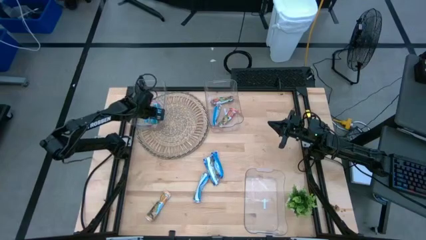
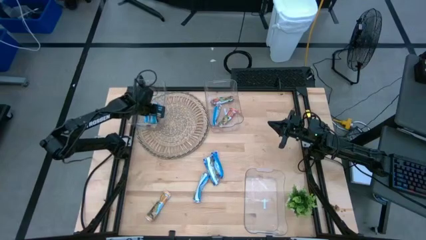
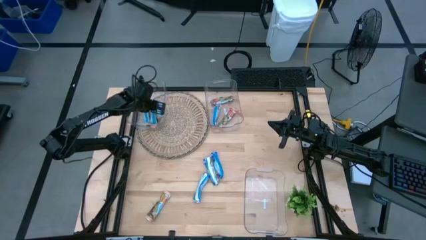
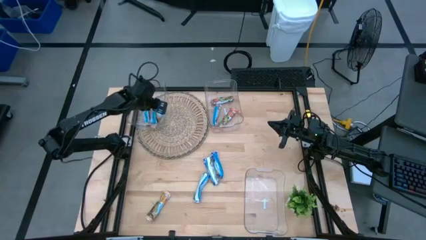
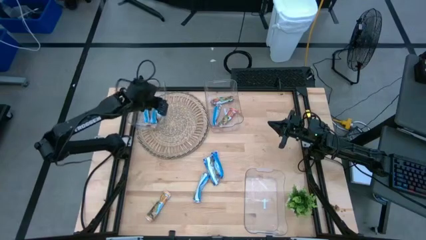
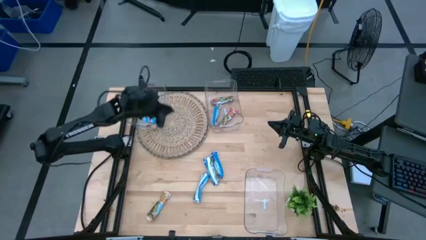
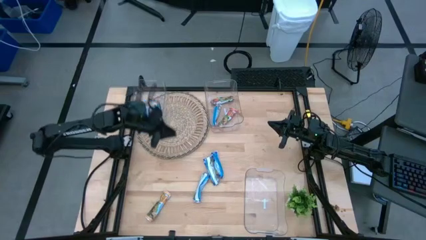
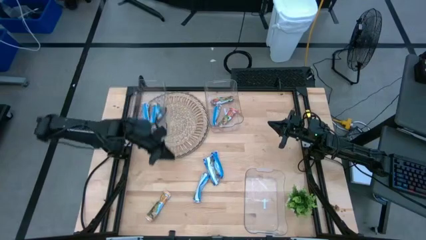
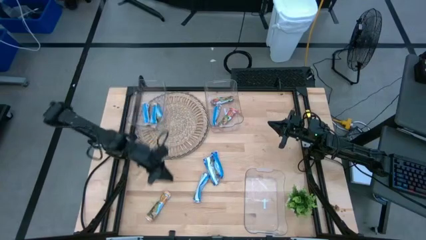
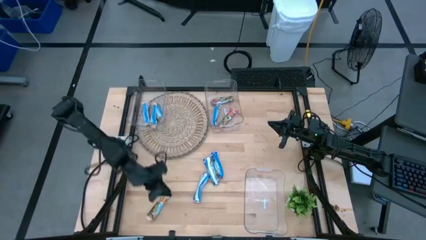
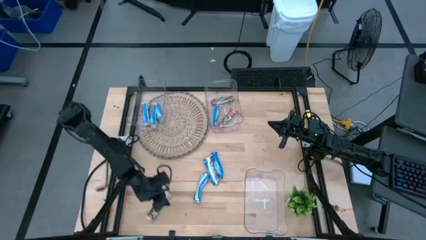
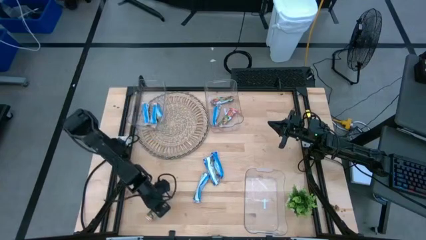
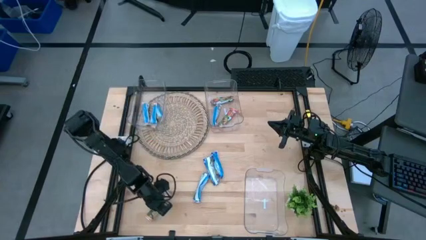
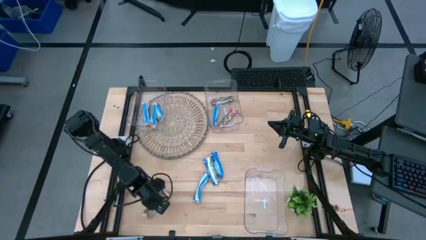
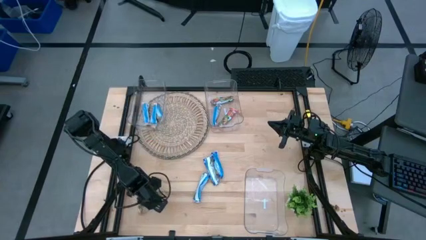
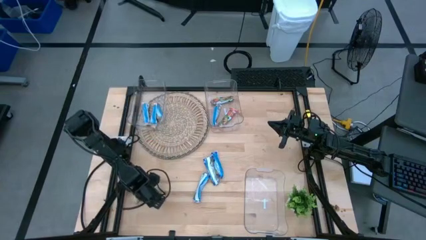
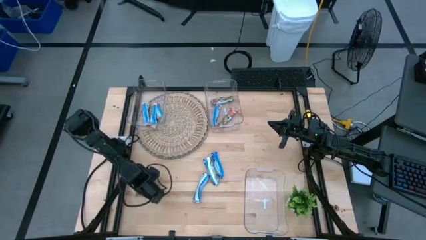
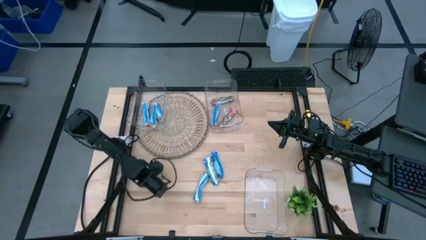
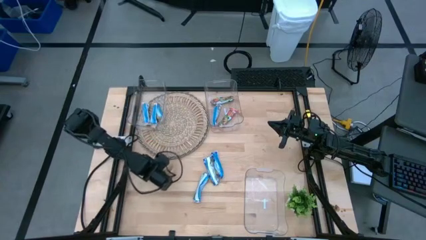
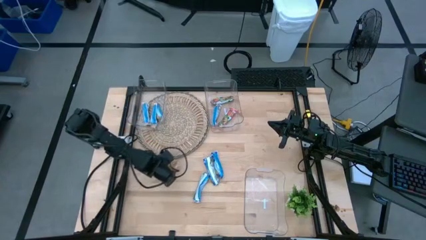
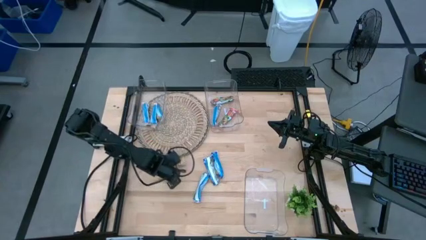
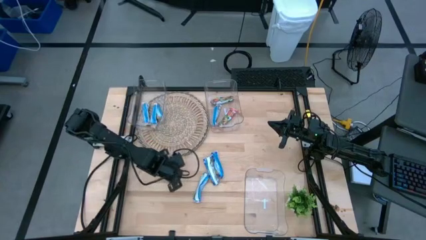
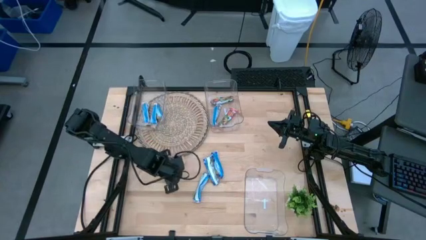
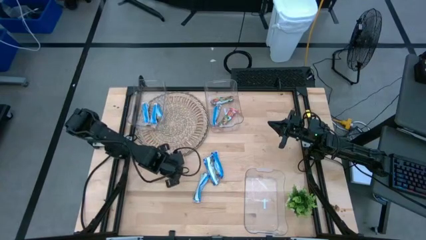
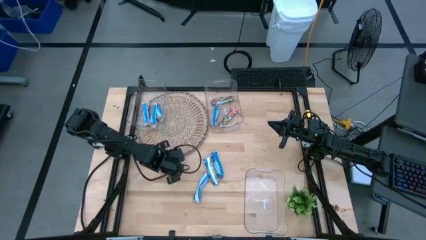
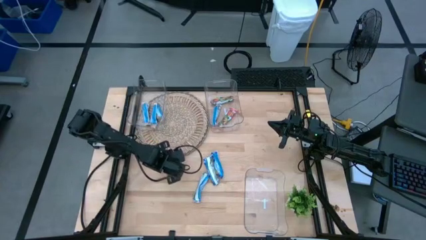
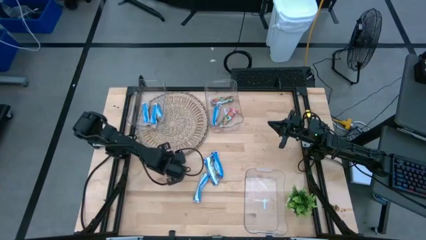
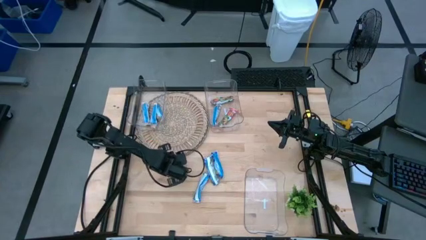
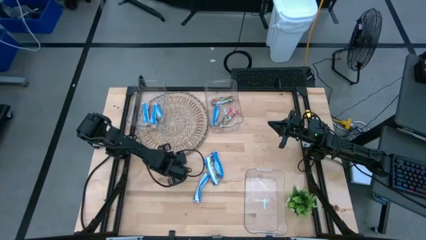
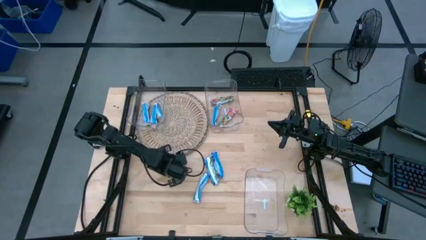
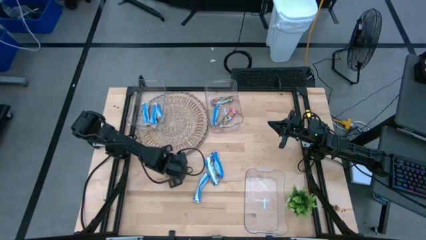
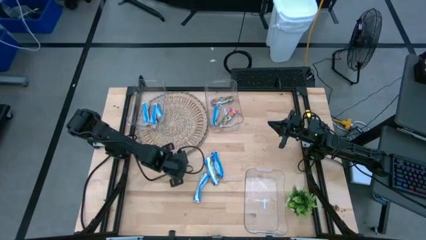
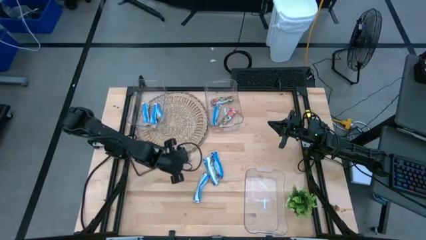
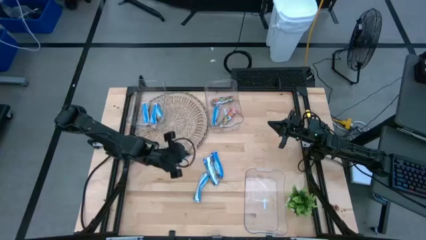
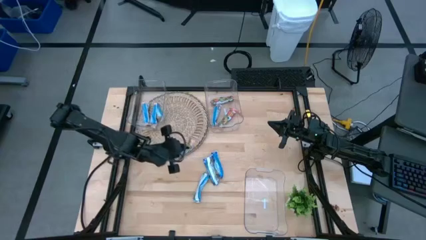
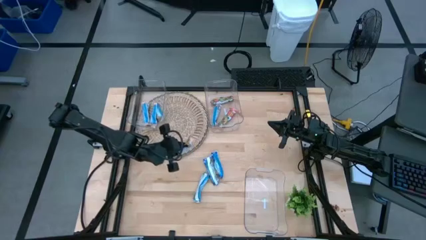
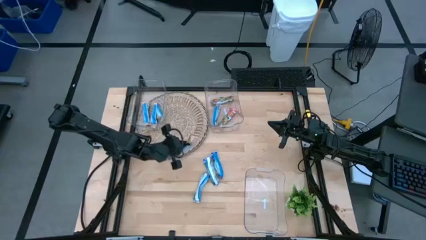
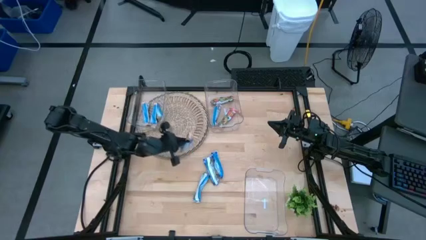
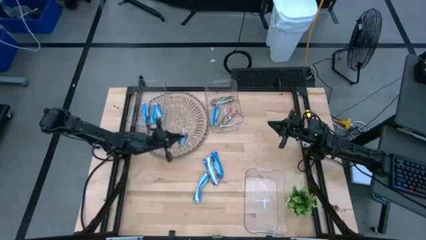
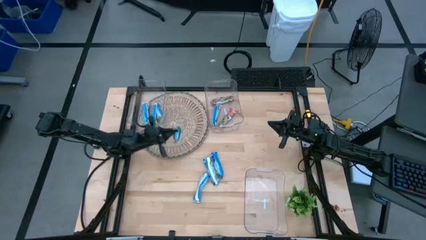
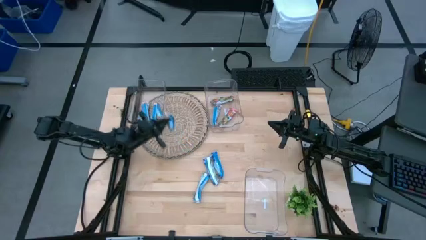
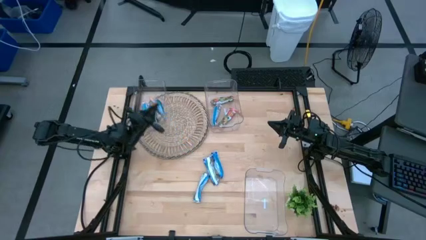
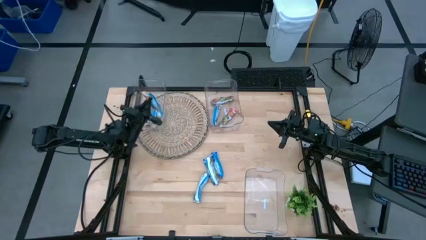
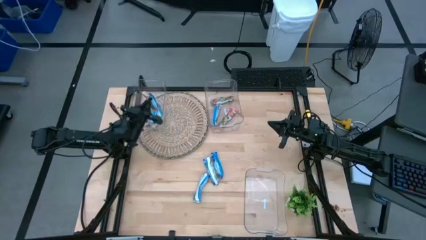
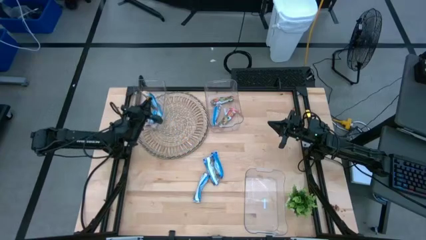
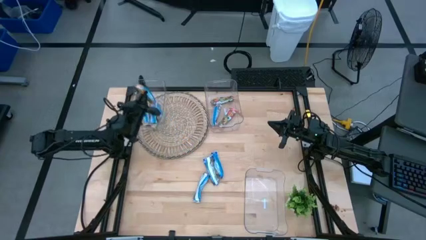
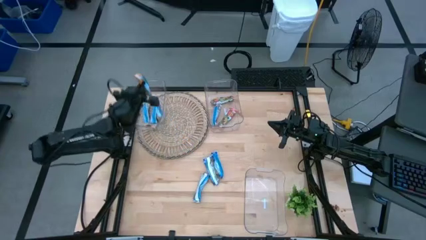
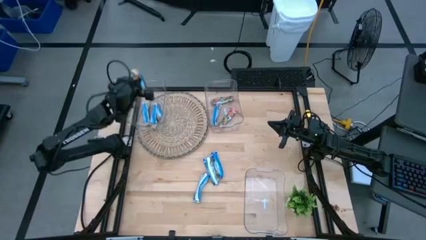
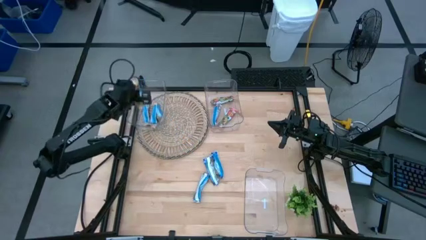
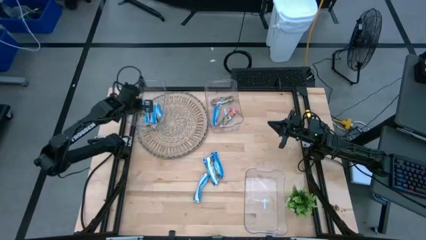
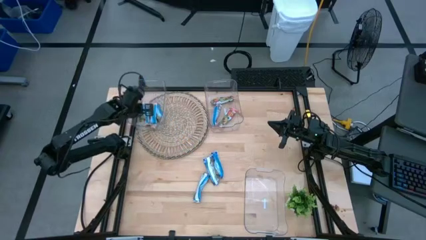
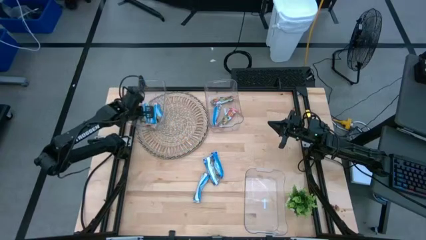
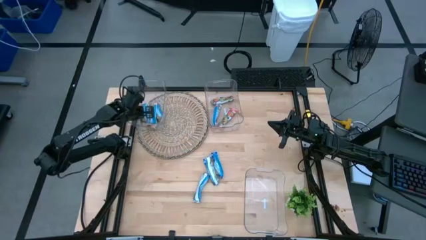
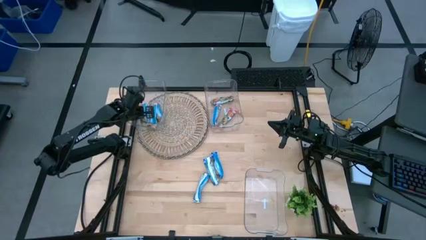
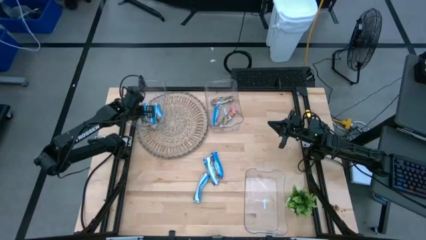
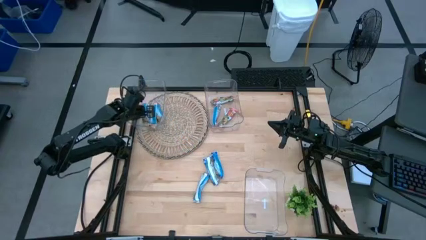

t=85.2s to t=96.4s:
Task: Pick and place Granola Bars by type
Put the yellow granola bar into the top left transparent bin

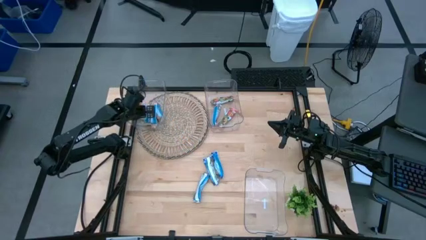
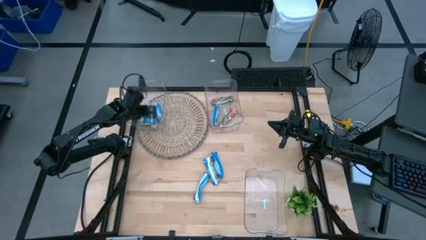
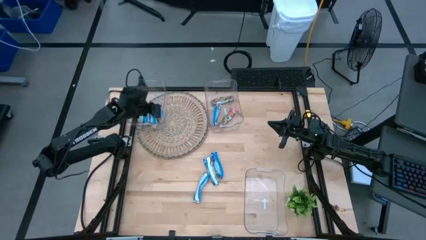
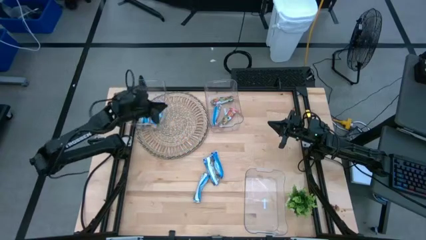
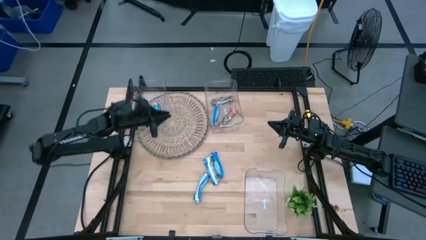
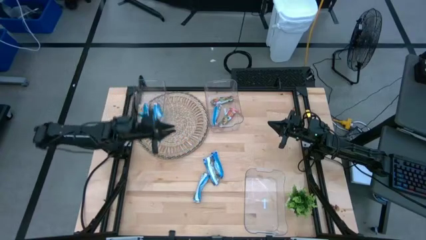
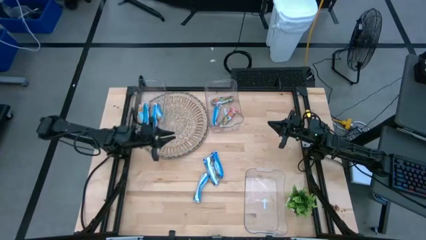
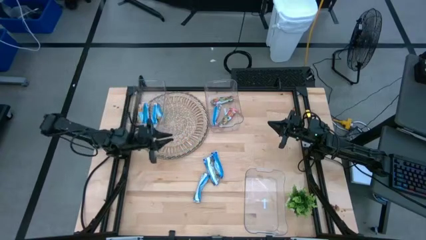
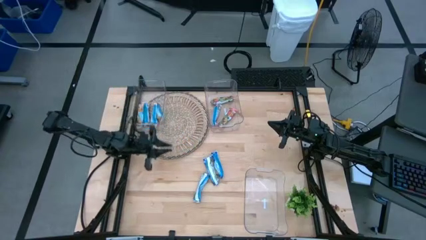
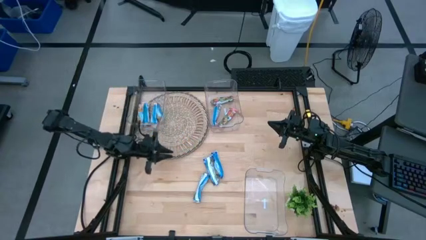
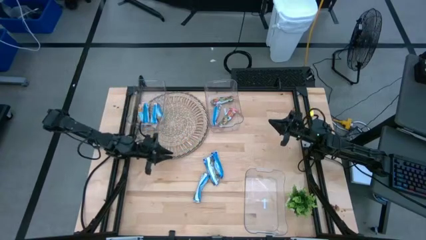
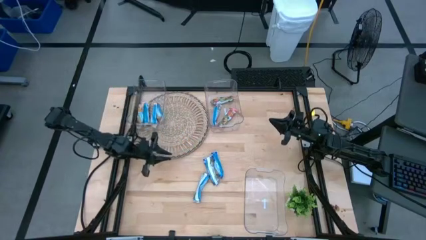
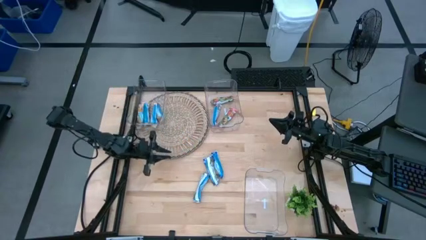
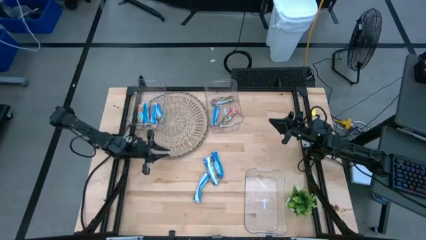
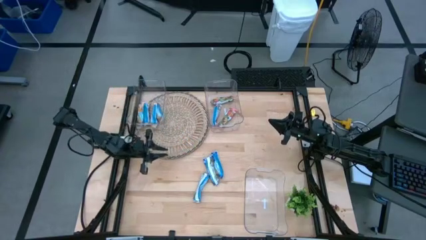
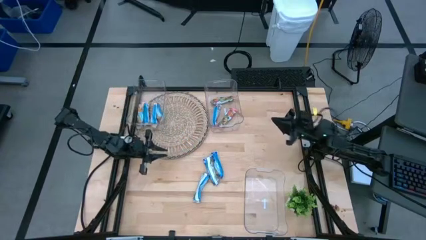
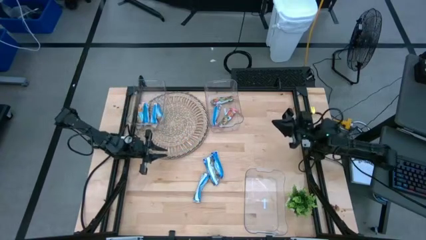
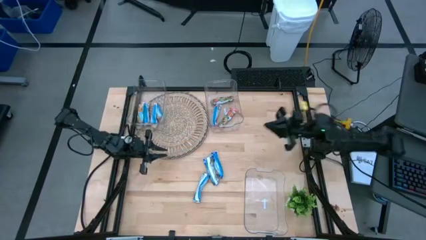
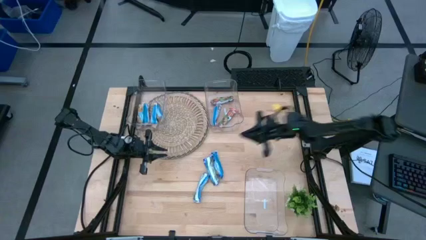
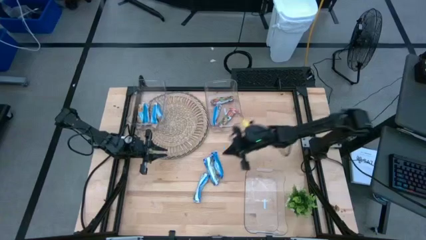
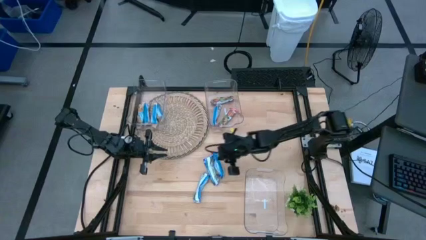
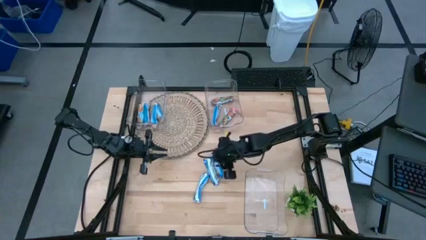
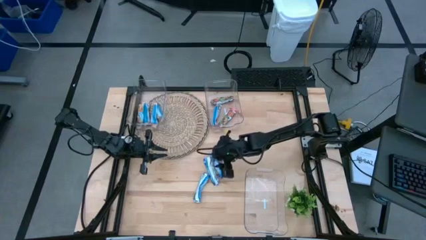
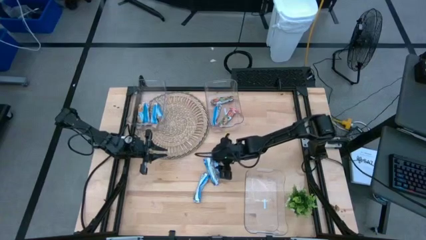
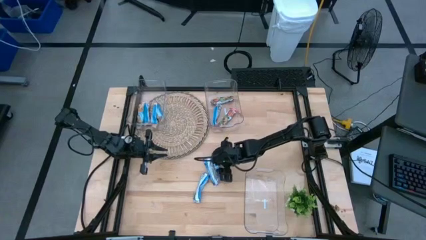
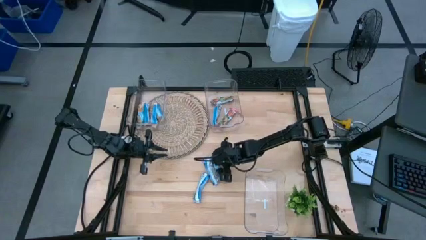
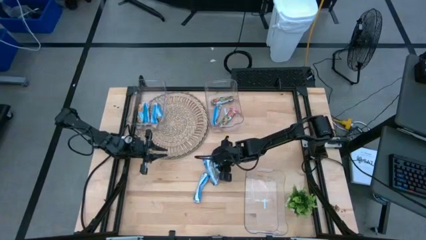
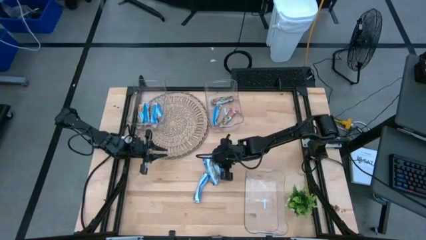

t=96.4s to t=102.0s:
Put the blue granola bar into the bottom transparent bin
